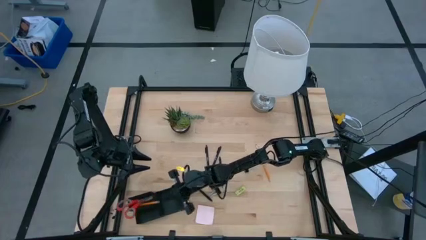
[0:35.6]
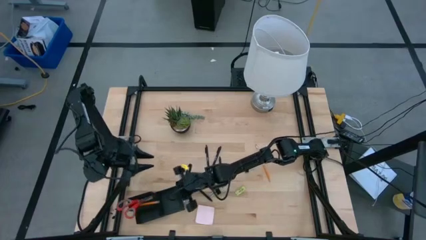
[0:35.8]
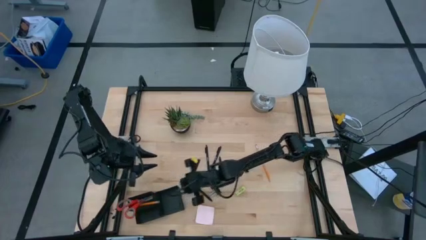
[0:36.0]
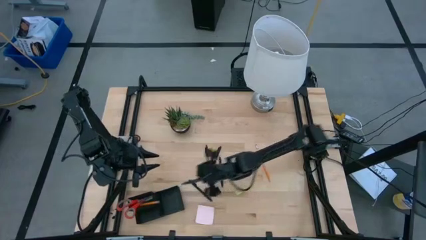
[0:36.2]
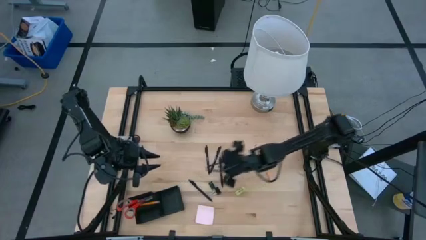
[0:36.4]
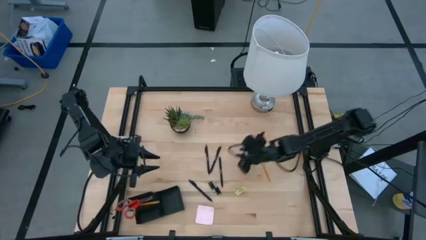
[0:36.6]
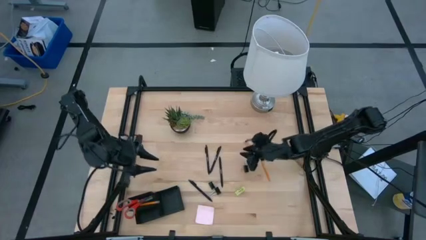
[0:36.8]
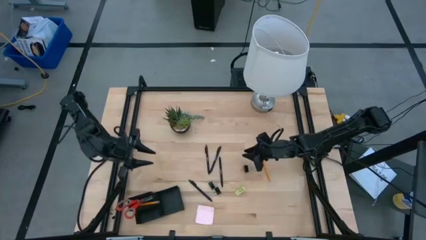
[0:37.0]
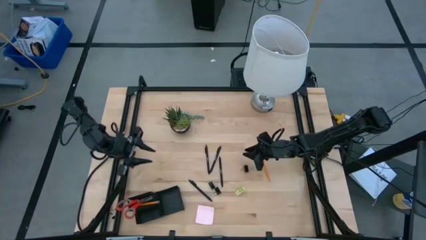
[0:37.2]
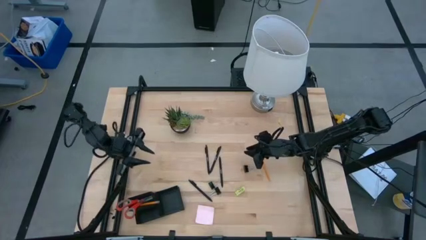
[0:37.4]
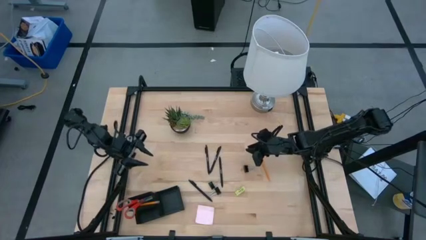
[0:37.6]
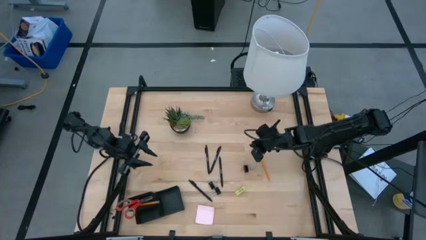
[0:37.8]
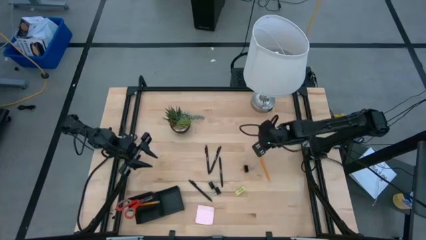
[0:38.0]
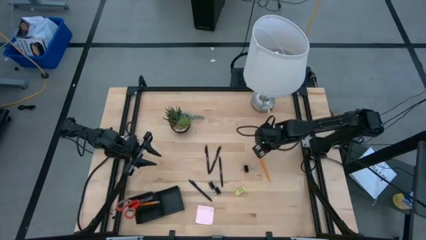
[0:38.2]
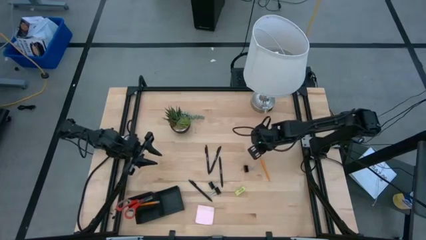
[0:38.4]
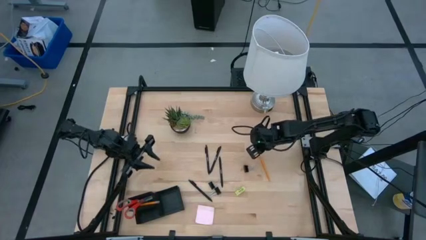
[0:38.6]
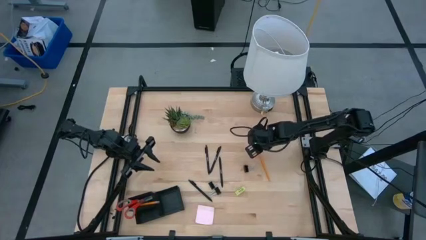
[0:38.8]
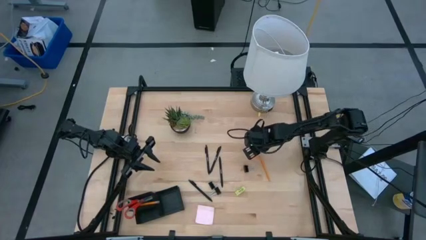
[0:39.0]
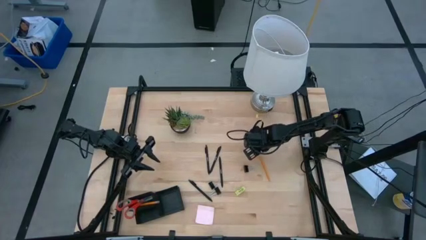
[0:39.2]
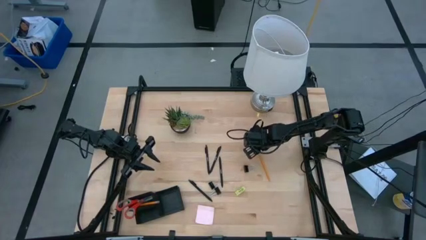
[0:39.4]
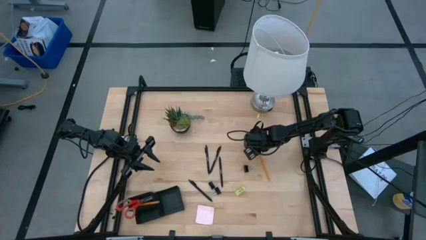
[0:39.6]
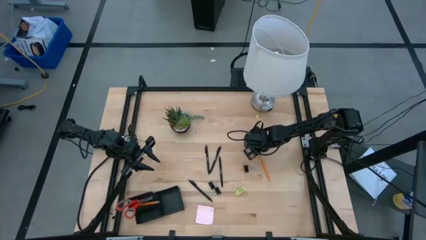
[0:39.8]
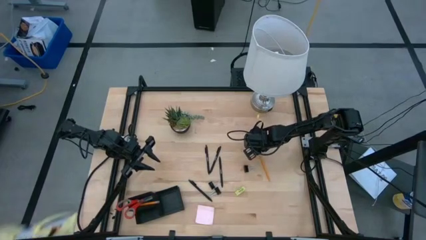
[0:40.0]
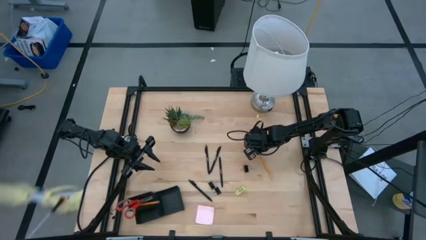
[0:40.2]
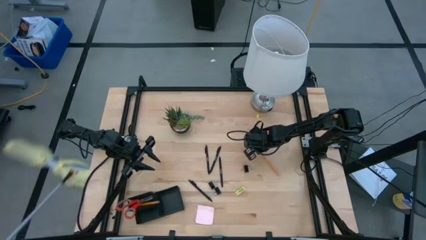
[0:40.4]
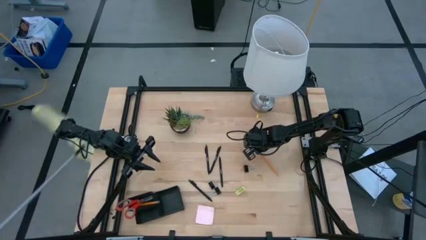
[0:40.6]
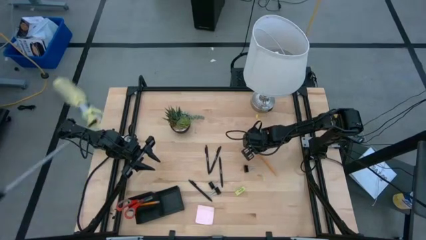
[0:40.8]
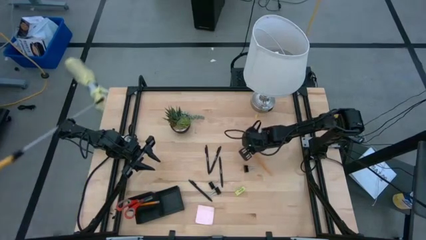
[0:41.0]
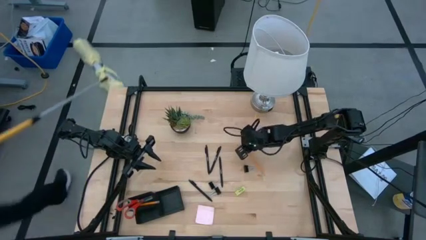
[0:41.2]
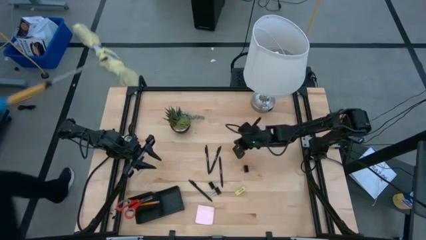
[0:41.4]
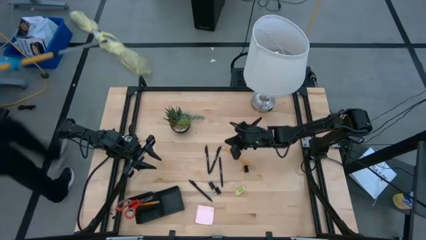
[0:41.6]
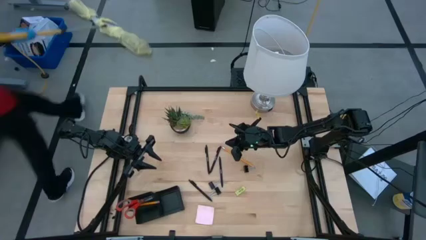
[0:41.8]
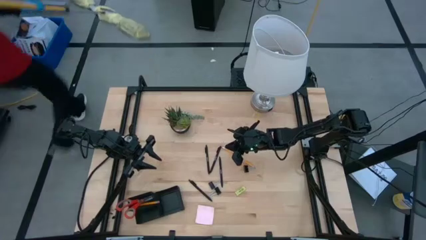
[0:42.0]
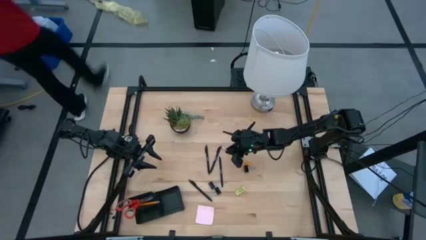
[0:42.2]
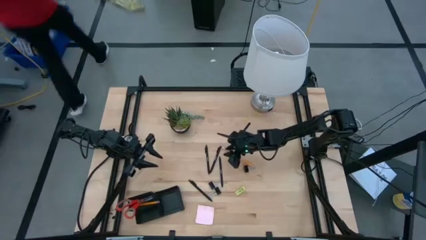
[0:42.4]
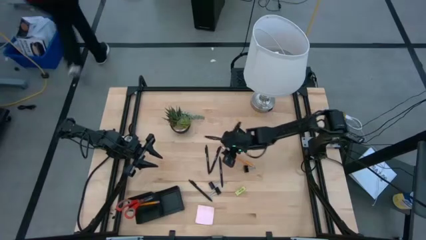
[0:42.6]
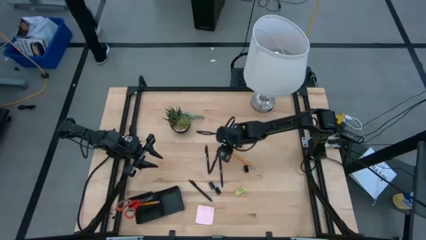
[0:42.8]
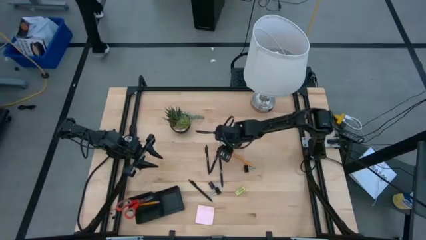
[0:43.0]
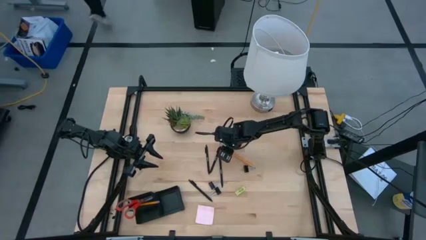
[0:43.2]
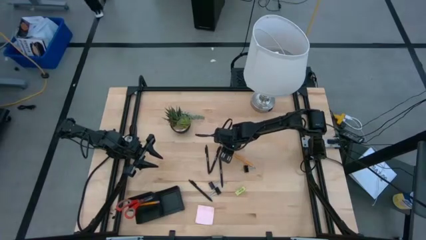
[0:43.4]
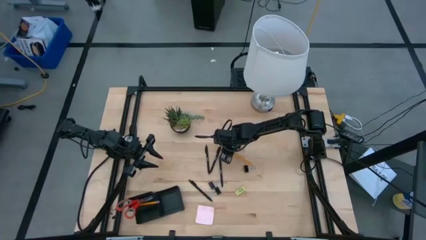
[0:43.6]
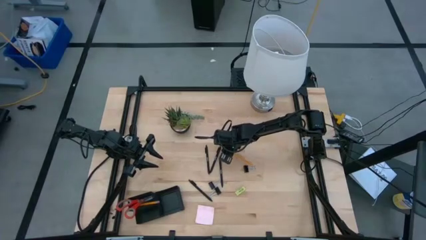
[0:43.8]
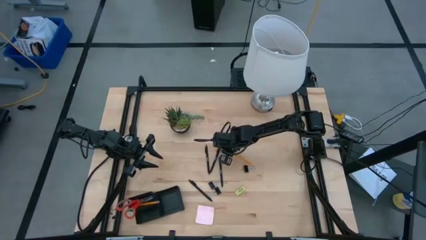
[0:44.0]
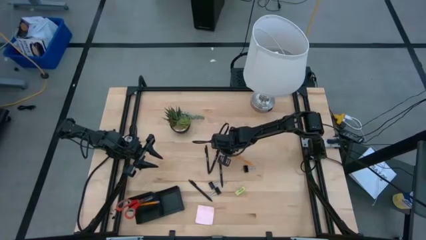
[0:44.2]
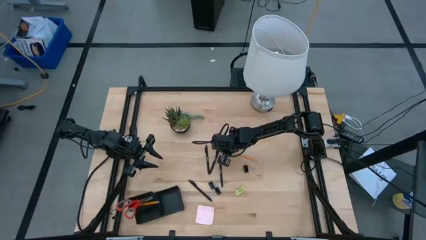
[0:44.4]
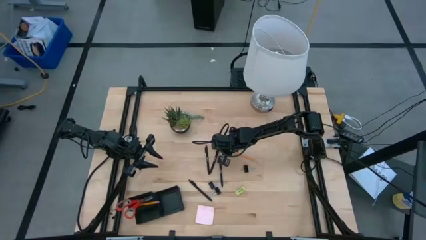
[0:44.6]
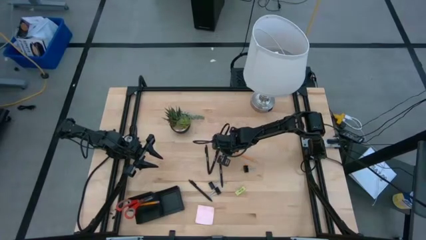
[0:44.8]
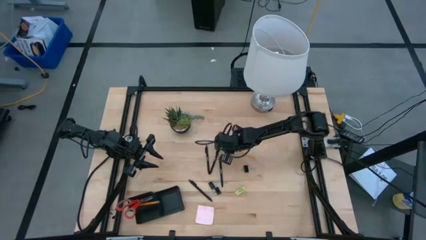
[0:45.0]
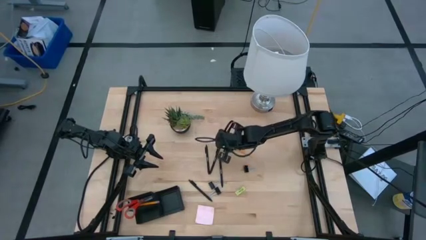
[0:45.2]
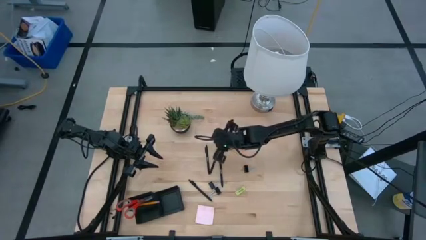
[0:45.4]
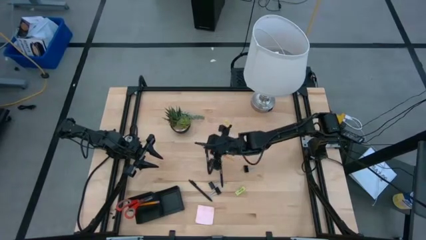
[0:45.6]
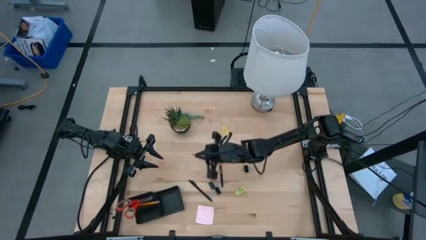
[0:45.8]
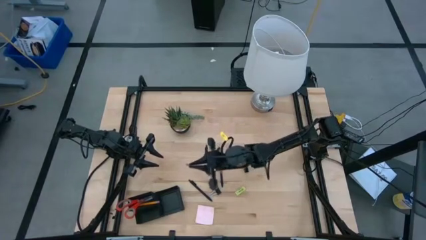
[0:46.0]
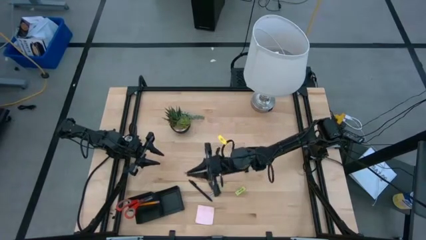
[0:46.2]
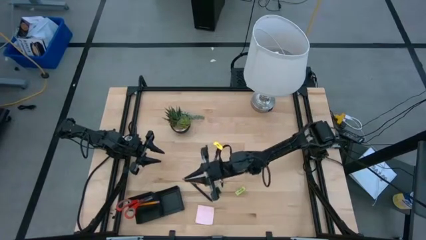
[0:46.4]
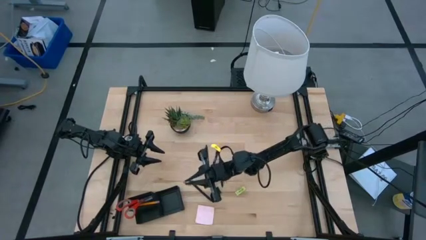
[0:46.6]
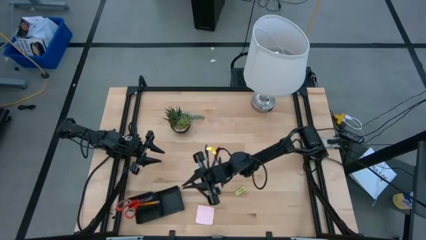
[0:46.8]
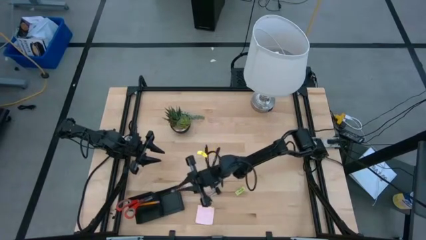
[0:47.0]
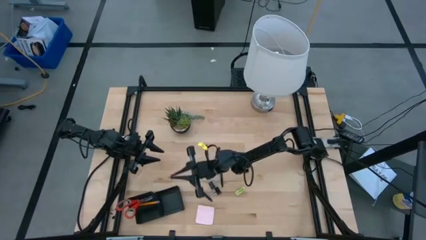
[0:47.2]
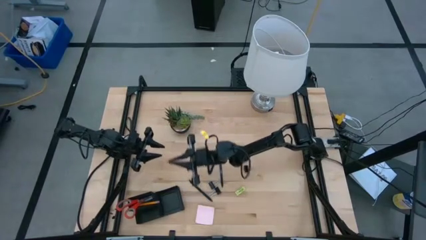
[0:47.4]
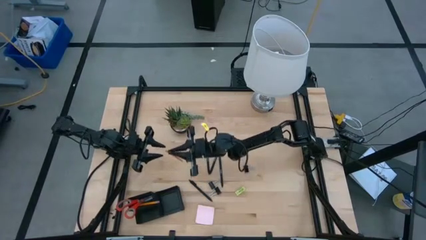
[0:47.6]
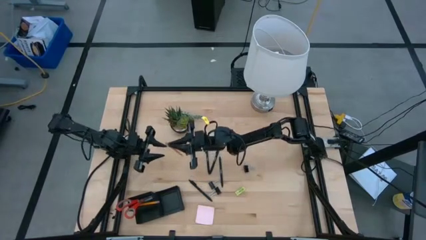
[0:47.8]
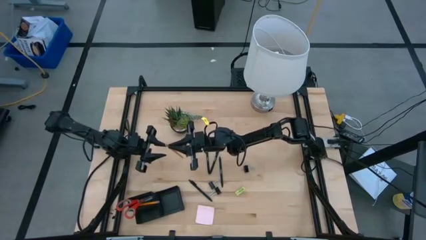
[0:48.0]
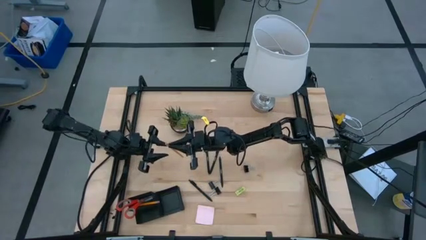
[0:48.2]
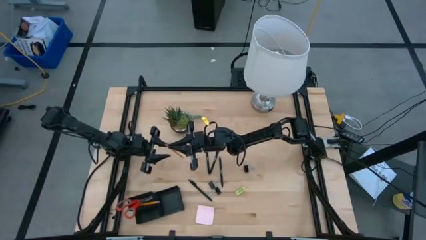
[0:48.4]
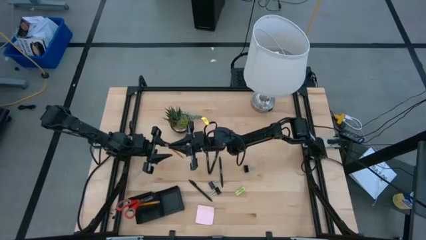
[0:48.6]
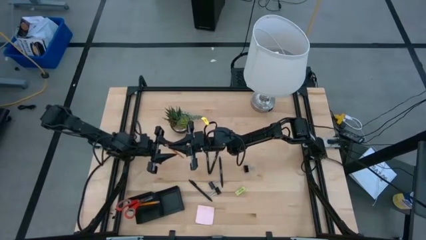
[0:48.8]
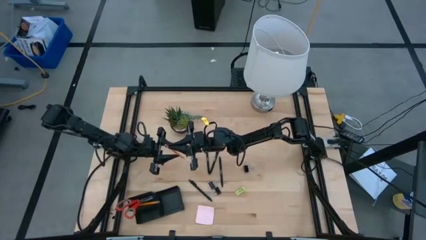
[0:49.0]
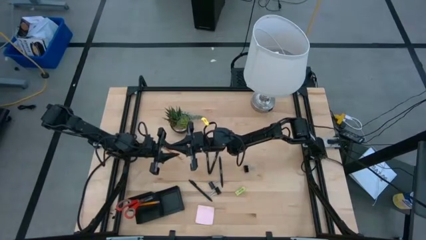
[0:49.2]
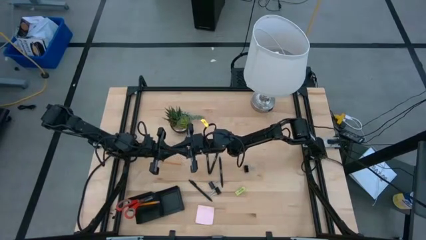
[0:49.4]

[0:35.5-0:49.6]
Task: Pick and place office supplies into organizer
Put the top binder clip into the bottom left section of the desk organizer

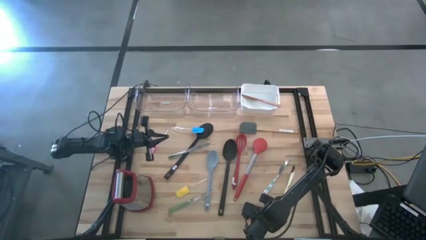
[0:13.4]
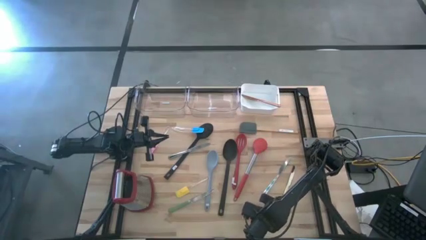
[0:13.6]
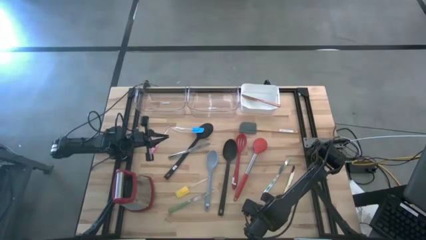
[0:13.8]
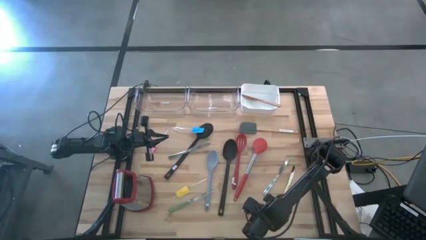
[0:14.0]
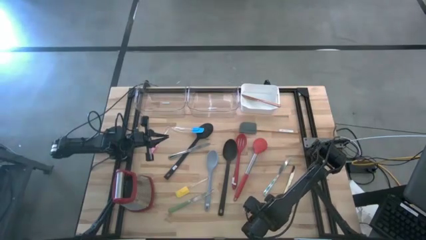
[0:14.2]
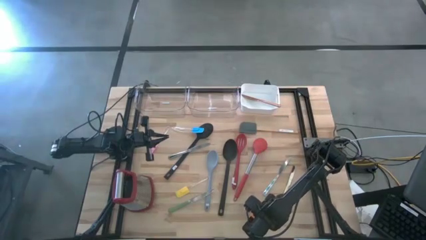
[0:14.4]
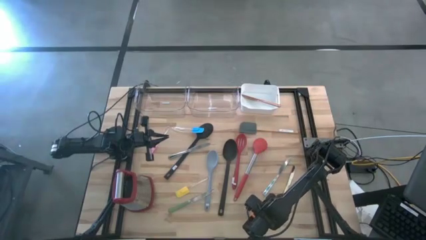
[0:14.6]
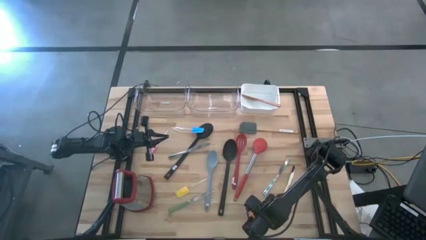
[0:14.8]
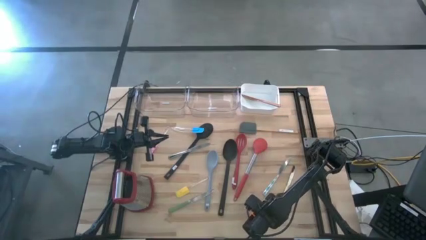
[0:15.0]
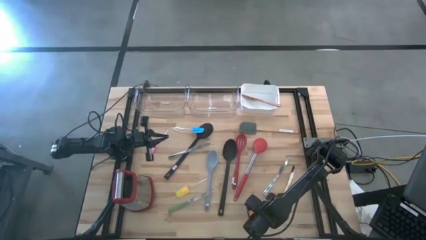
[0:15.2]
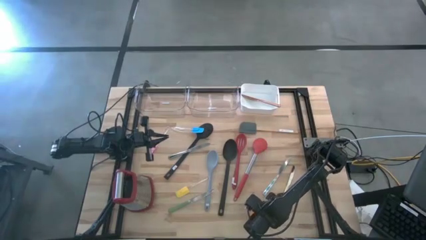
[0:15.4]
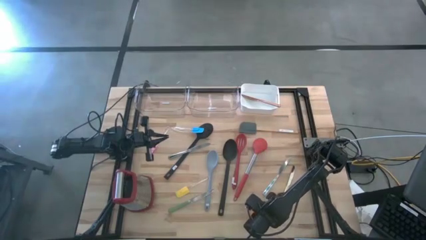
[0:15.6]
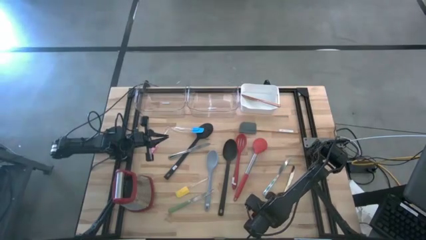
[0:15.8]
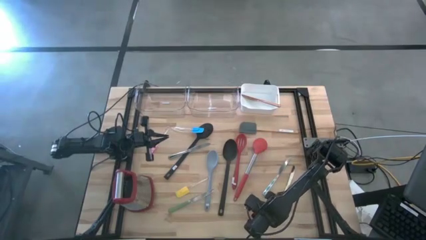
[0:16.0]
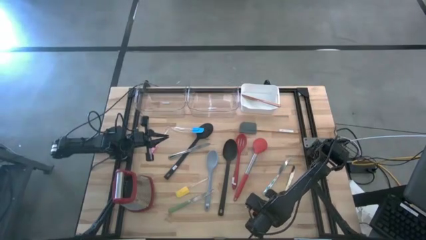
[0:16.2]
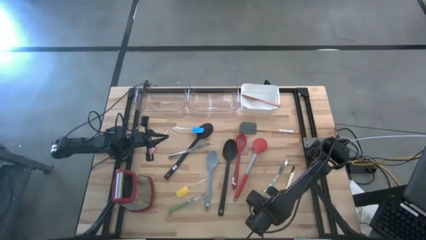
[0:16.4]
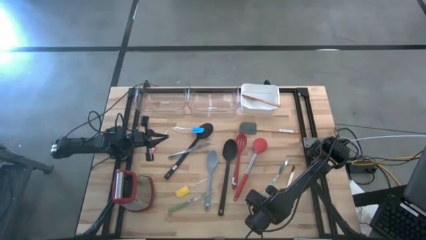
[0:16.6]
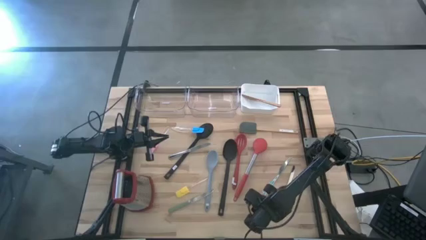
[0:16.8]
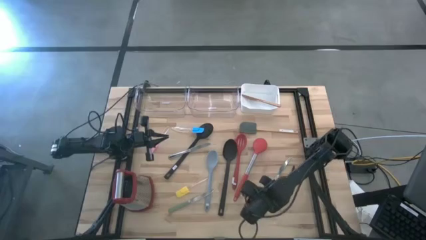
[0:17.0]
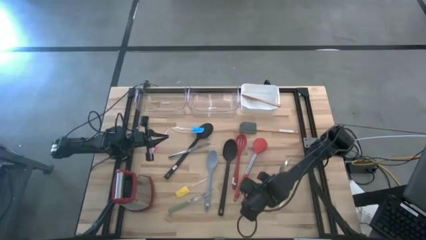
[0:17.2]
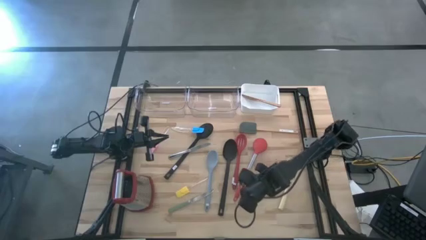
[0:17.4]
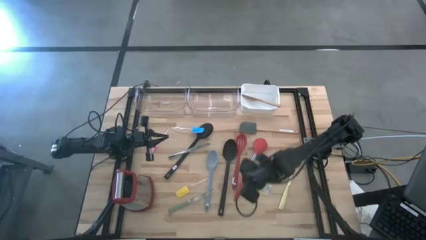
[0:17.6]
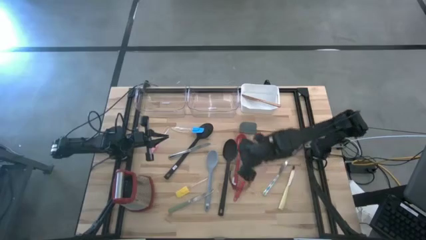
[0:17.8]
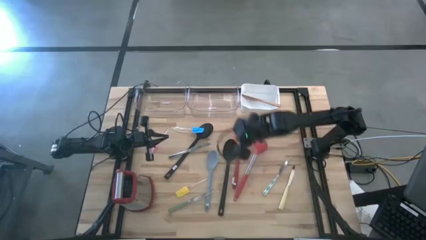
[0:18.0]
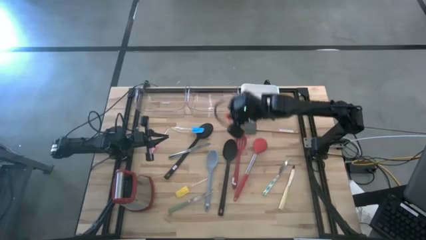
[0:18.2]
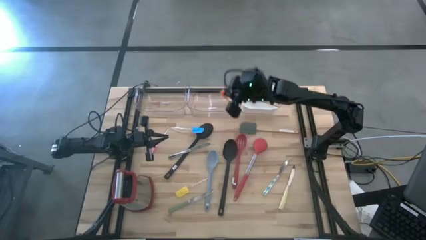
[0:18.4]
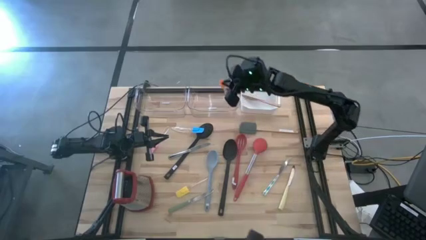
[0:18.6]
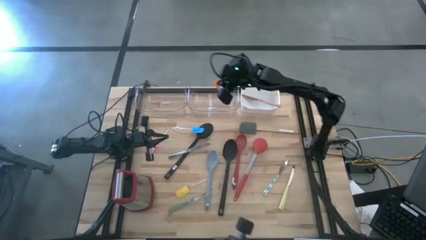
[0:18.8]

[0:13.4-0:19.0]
Task: Pick & Place Kitchen Items
Put the orange spatula into the right transparent bin
